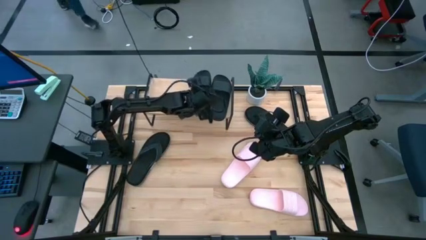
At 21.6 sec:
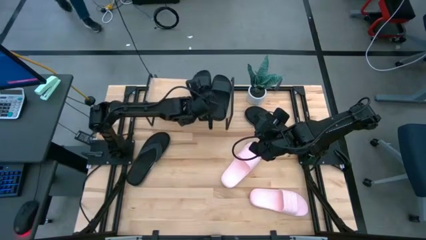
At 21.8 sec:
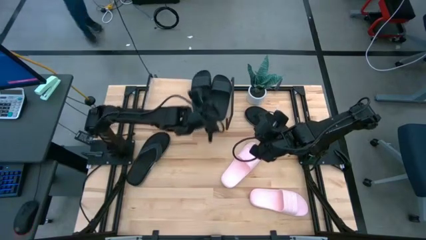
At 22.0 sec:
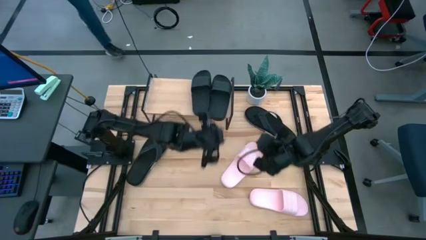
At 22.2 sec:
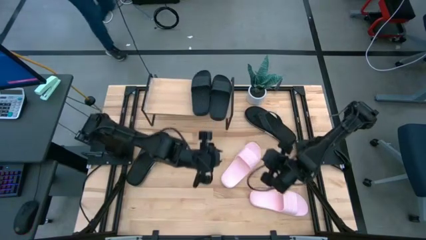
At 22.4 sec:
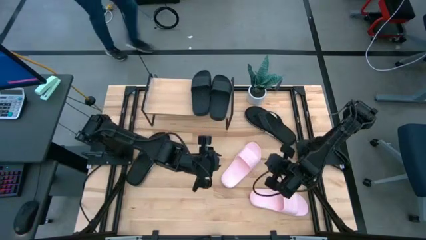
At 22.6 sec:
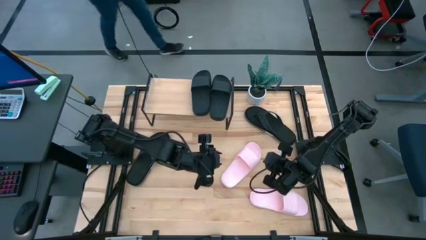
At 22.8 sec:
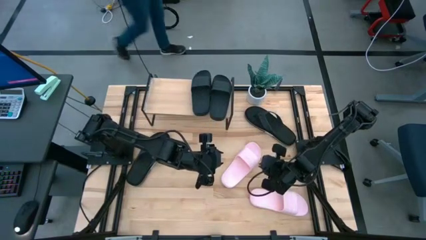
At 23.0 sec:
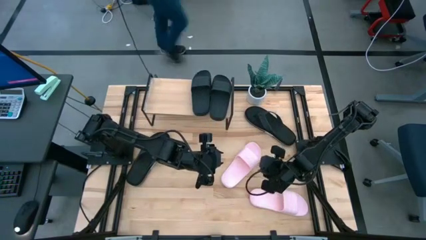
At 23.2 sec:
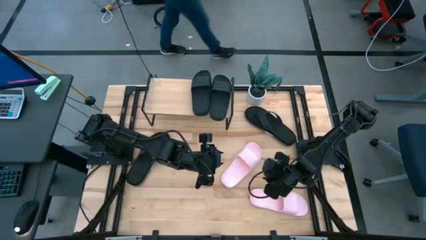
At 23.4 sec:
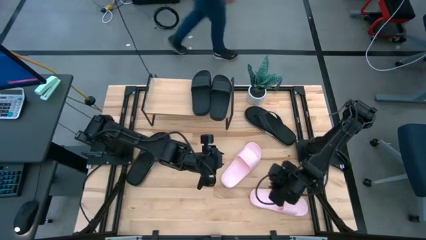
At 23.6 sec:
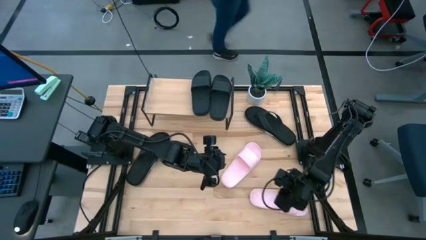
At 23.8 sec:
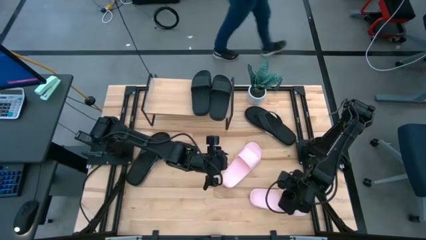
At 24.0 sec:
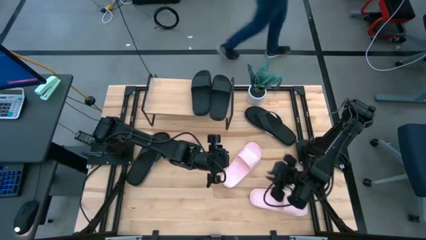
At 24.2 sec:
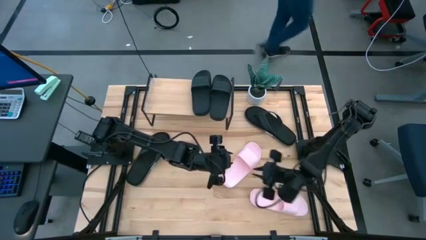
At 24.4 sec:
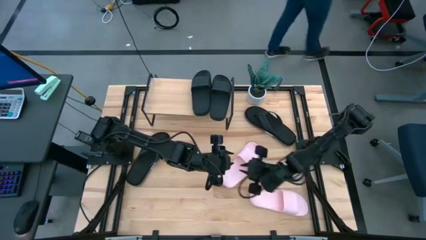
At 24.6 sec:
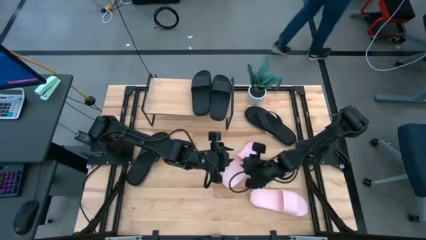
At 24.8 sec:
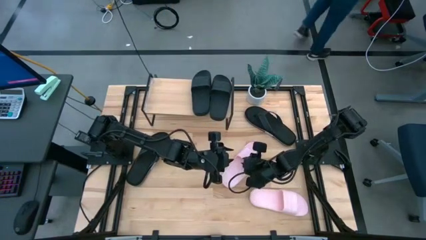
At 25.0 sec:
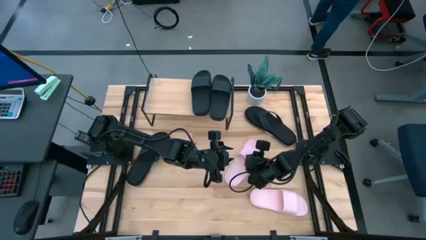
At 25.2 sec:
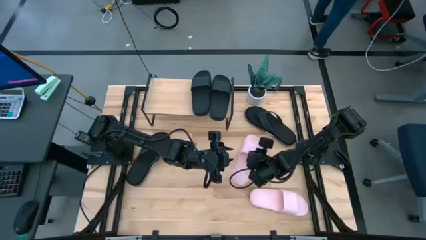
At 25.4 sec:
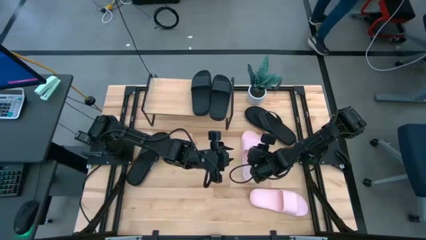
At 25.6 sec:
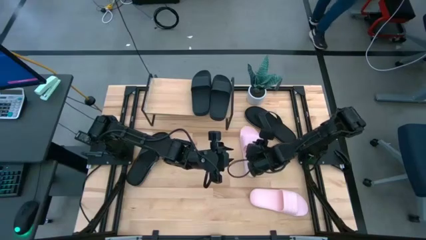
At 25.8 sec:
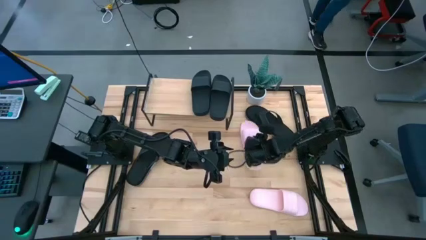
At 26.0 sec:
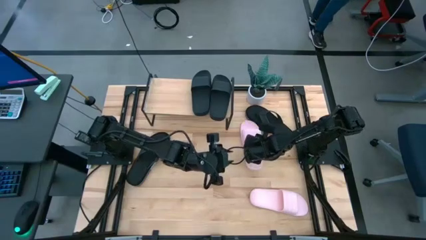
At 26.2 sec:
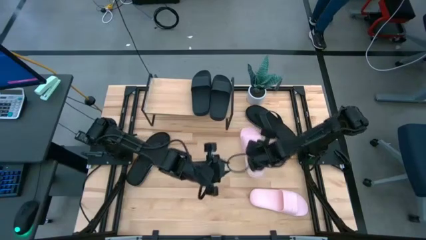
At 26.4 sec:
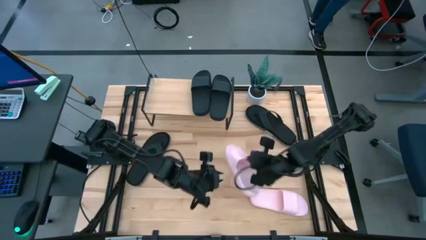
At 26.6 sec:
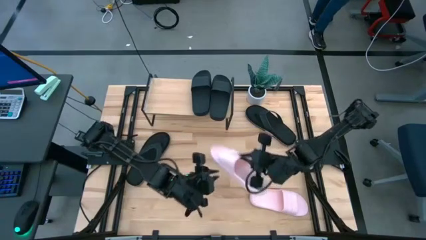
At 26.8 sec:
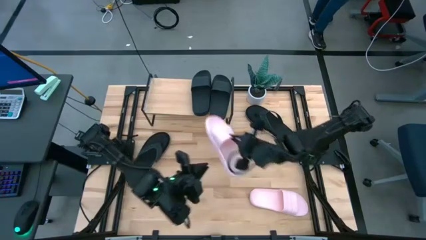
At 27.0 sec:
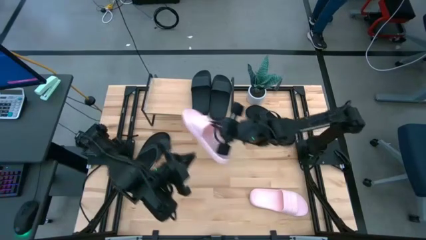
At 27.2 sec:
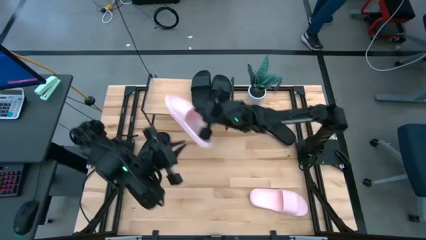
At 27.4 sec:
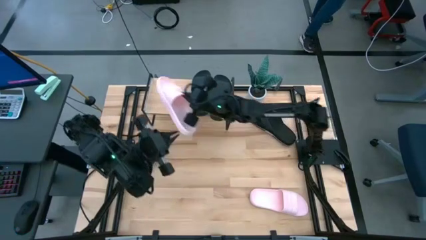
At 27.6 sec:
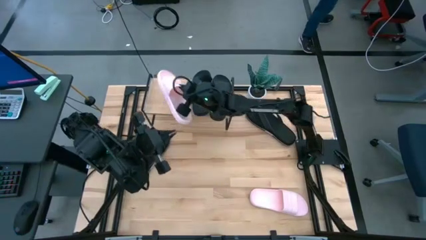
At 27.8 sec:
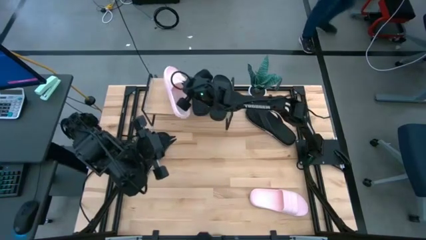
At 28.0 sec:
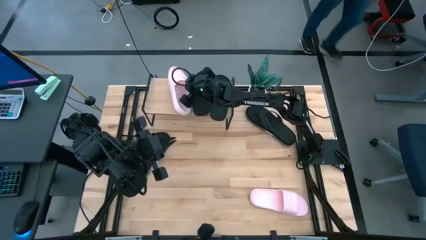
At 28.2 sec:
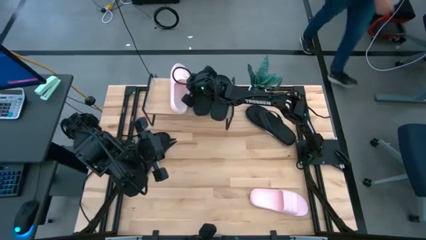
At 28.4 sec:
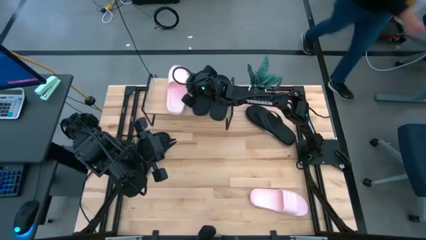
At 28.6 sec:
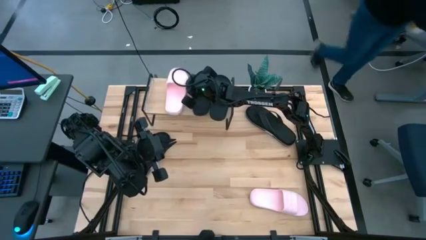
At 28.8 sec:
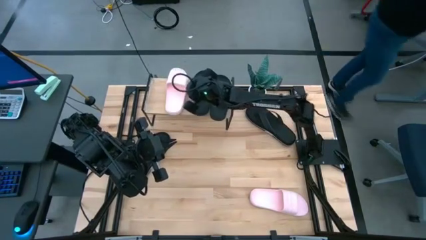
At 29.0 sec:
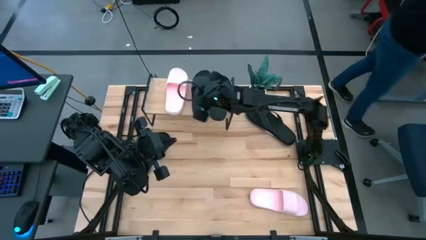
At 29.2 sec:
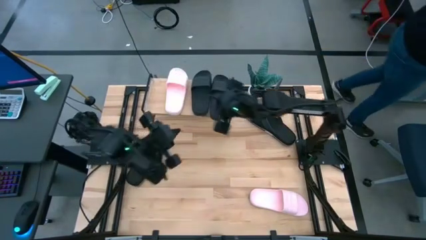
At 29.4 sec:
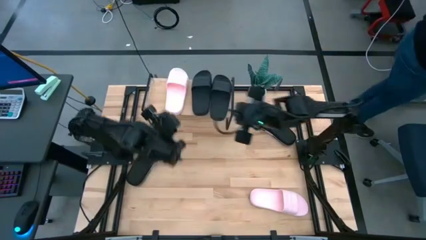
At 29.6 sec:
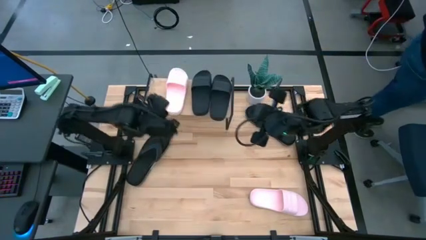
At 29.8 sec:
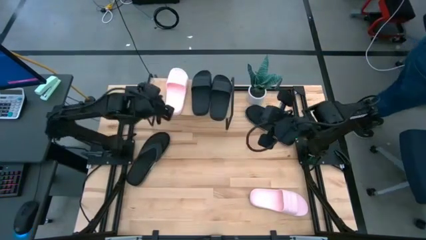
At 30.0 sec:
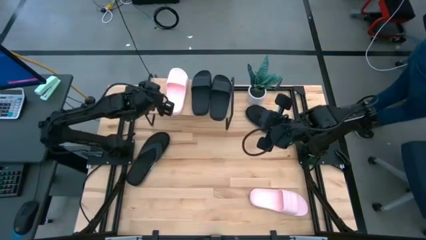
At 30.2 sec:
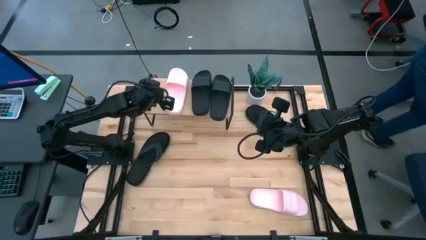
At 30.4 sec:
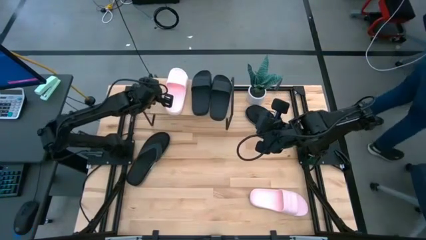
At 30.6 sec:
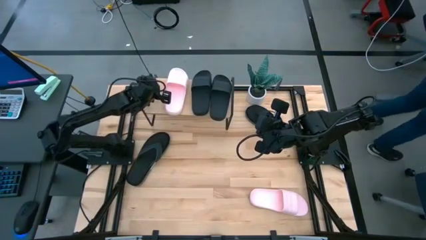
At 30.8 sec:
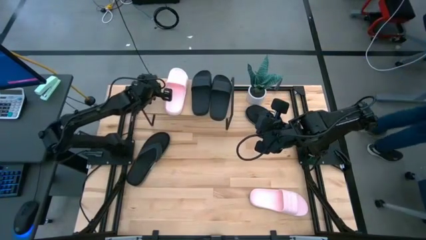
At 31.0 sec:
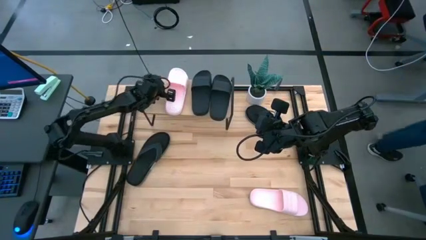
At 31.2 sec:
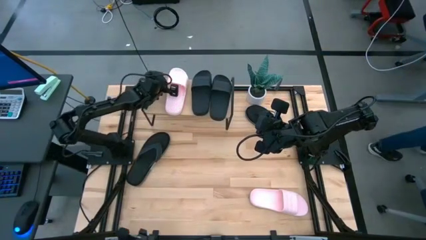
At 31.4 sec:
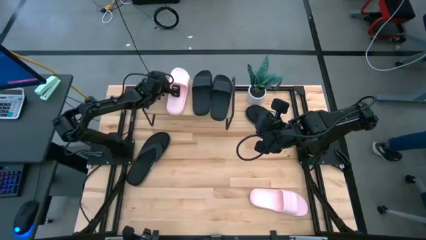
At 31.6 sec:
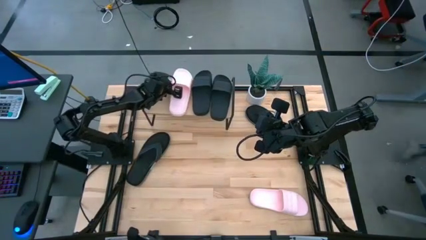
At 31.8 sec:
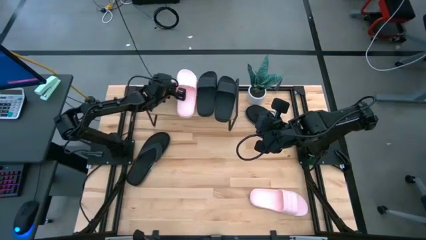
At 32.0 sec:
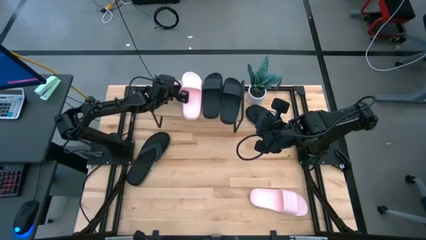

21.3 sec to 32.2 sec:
Task: Pick and place slides into the shelf
Put the top pink slide on the shelf

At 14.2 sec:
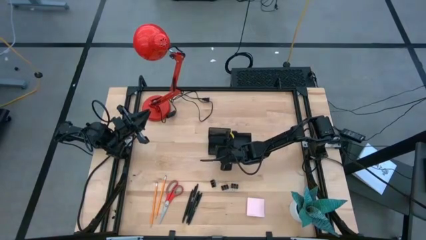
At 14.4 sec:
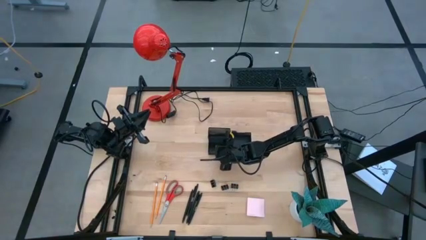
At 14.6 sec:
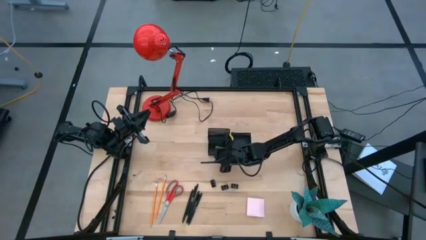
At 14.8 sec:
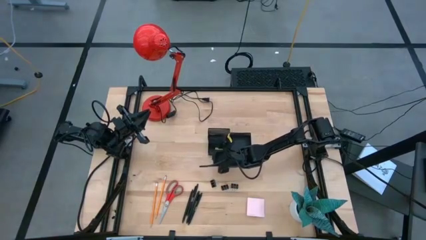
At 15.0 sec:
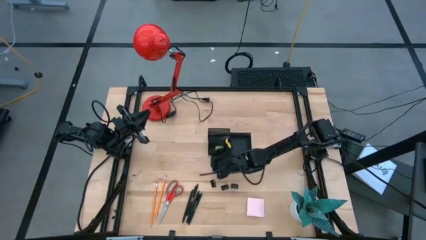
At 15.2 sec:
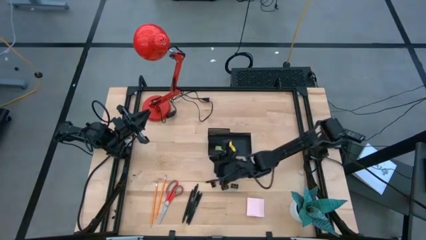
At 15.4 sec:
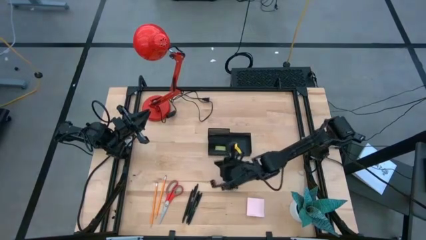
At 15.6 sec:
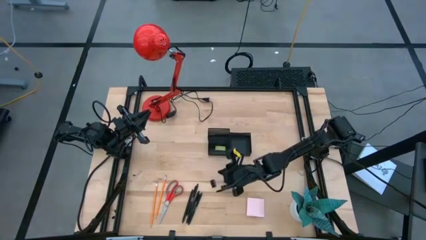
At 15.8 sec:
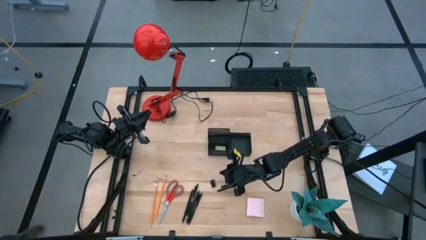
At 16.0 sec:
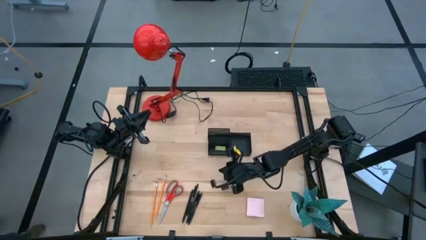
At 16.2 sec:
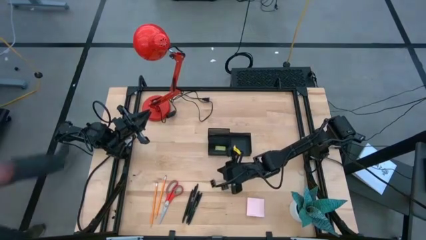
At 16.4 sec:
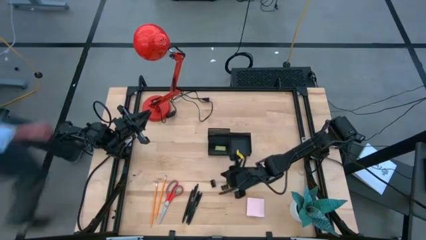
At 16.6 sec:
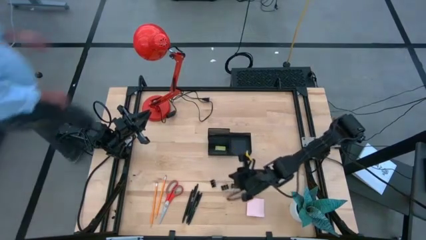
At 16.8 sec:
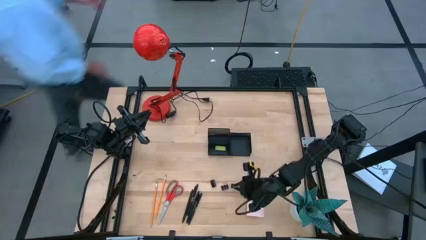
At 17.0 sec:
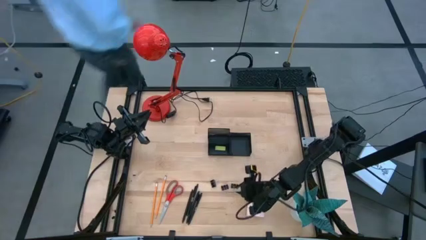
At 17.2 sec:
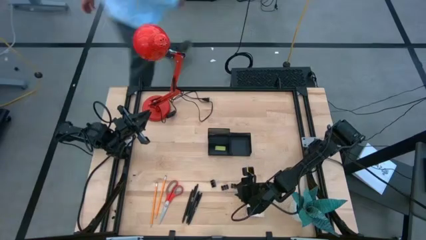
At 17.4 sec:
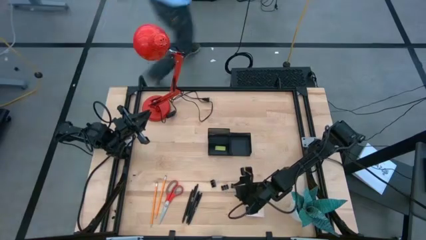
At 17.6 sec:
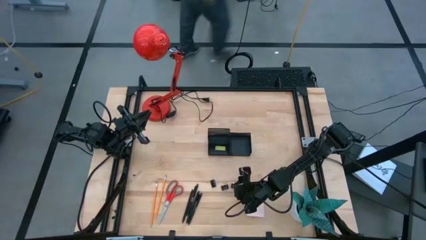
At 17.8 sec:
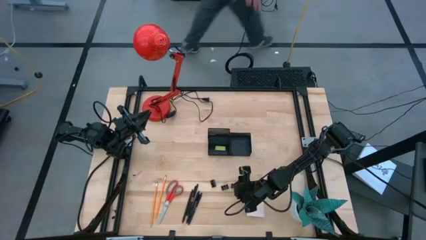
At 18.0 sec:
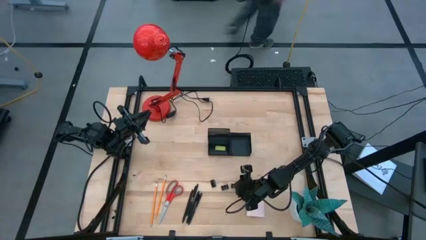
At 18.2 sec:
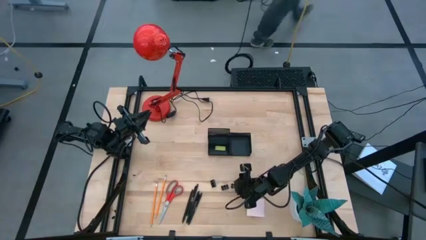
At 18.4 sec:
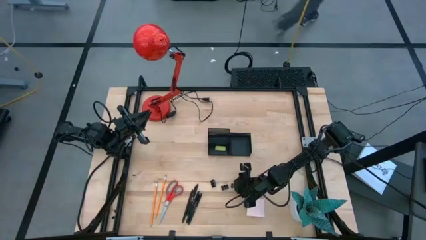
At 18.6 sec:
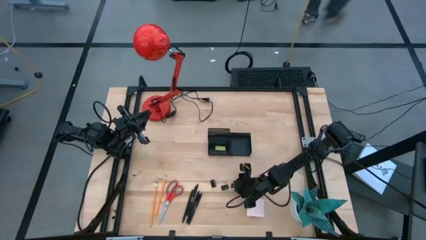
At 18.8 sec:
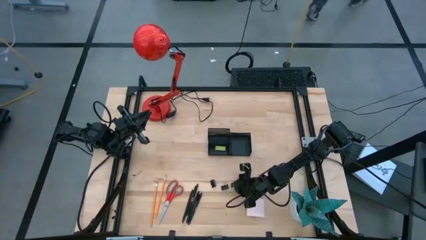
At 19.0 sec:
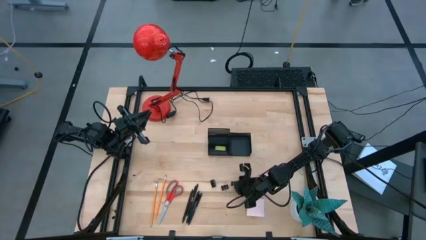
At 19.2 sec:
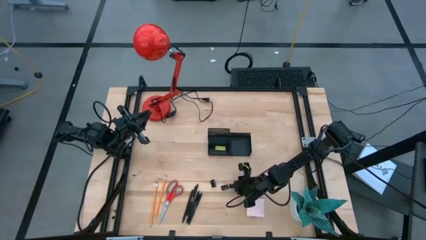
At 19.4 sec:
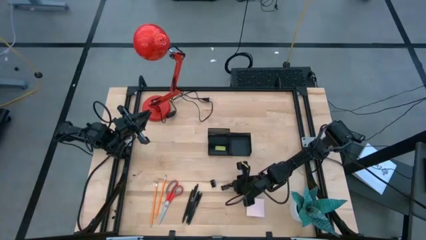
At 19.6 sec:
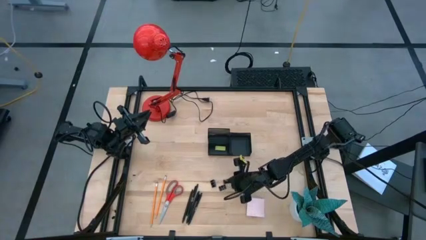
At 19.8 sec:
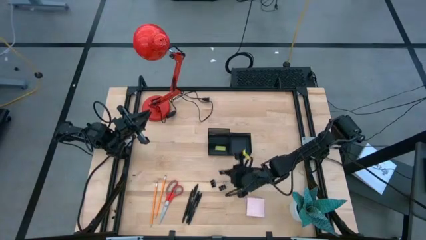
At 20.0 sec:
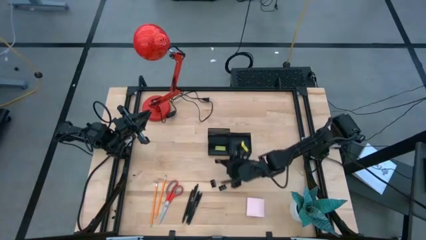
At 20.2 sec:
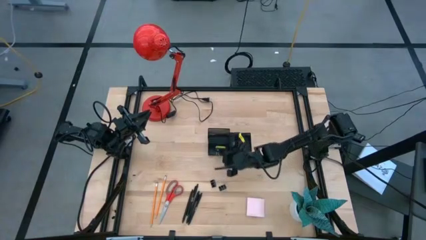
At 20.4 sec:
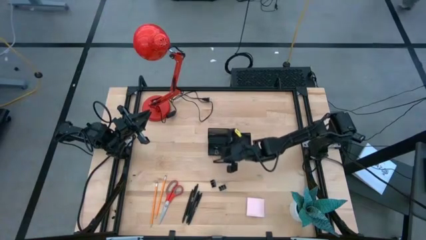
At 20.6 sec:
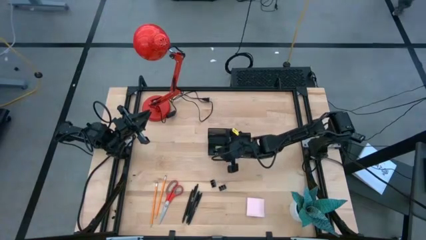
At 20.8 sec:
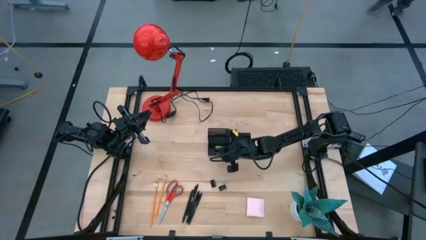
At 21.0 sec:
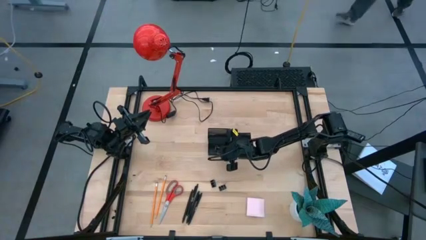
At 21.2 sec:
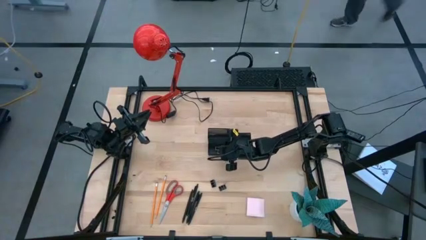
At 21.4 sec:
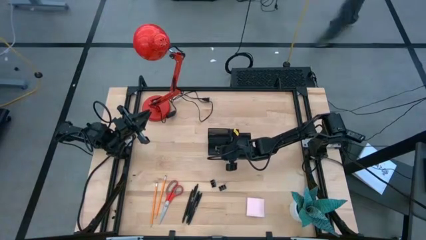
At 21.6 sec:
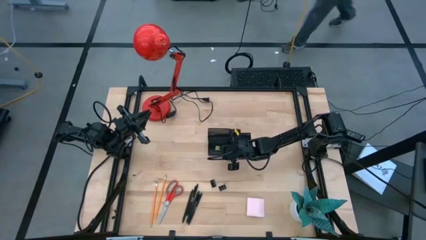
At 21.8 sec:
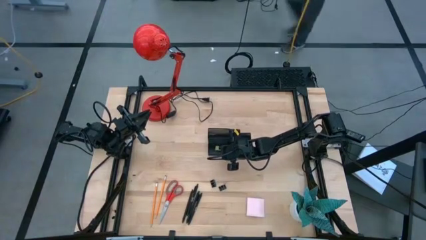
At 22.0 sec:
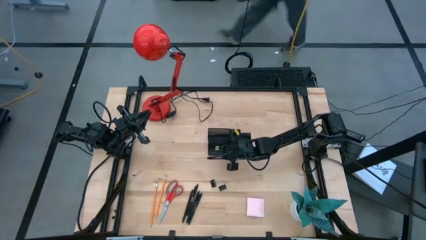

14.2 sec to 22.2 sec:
Task: Pick and place office supplies into organizer
Put the right black binder clip into the black desk organizer
